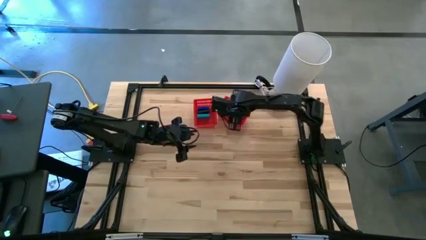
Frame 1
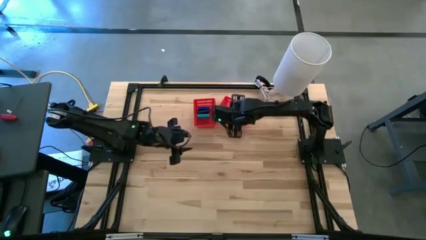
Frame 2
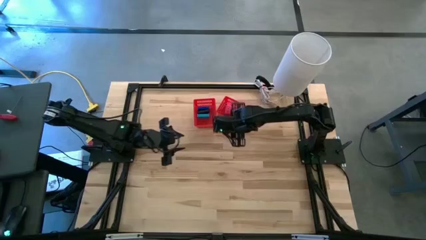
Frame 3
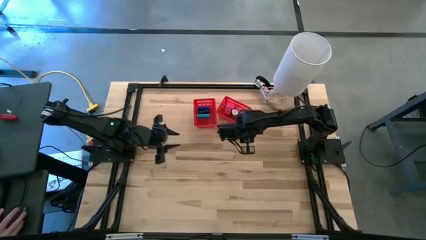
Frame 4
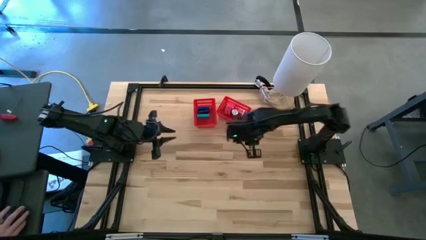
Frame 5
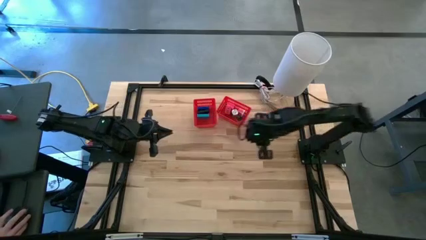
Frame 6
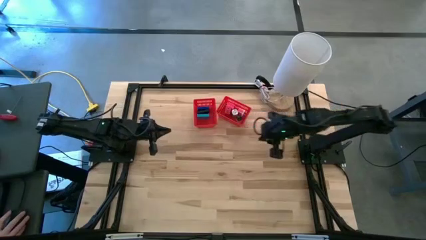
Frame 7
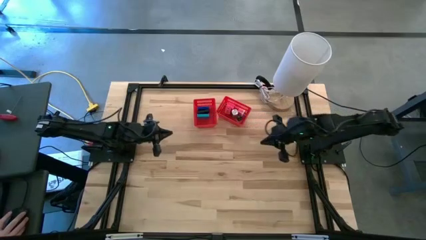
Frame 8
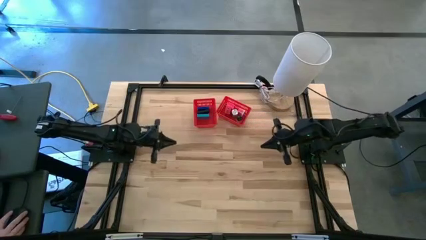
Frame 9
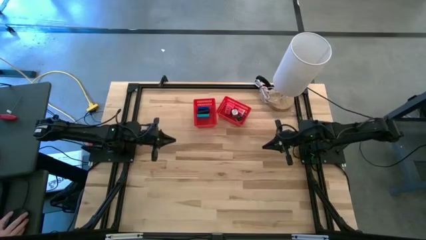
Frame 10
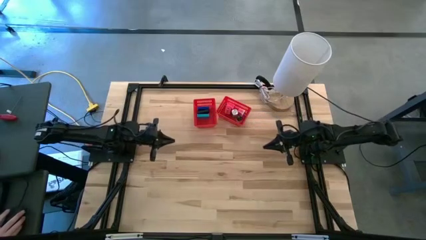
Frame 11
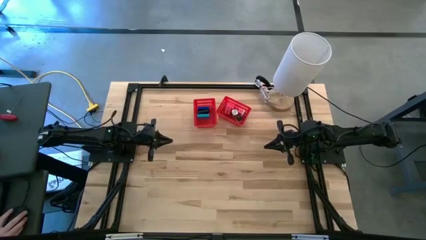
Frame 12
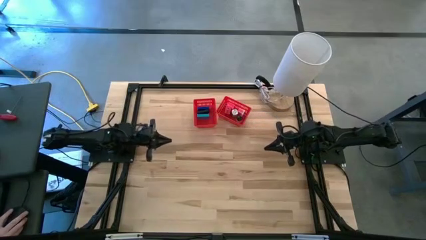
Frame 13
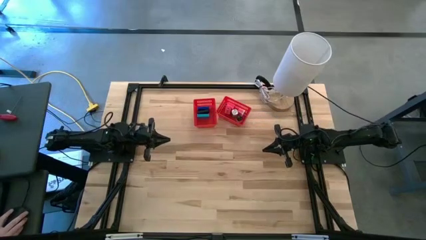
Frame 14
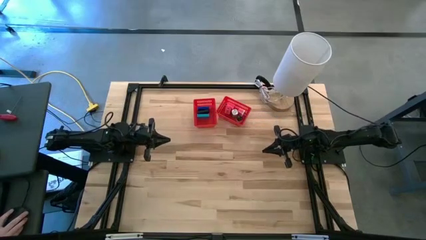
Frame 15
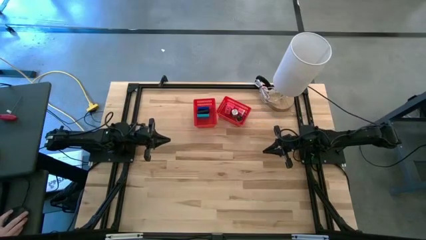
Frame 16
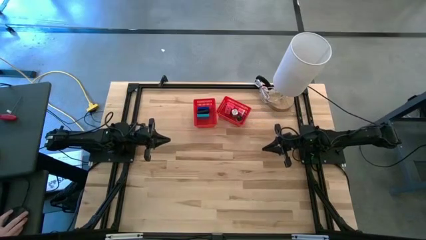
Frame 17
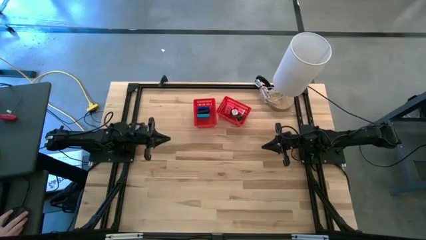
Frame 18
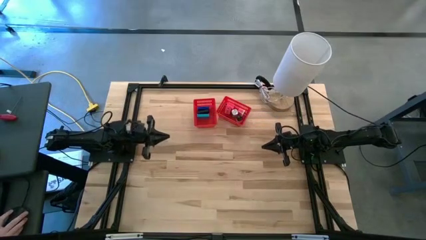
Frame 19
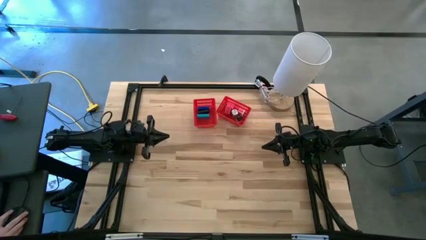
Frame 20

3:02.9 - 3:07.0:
Task: Pick & Place Office items
Return to Home Position

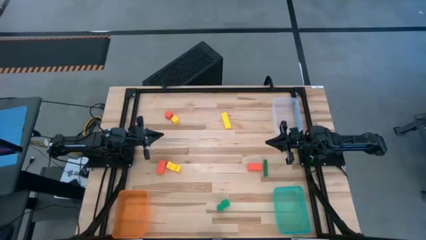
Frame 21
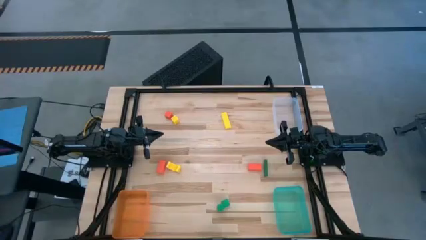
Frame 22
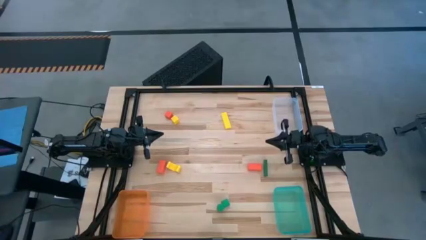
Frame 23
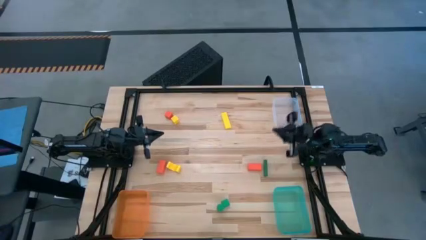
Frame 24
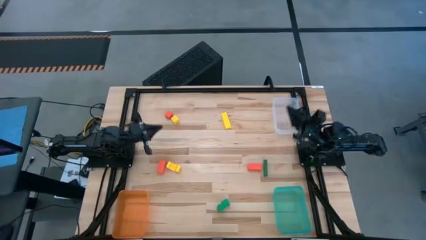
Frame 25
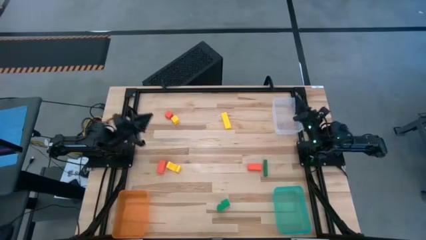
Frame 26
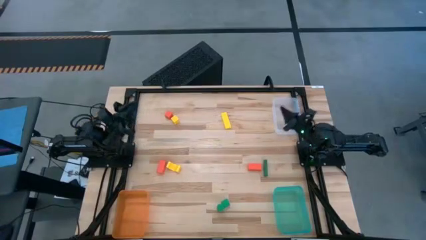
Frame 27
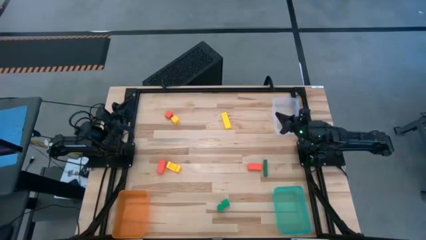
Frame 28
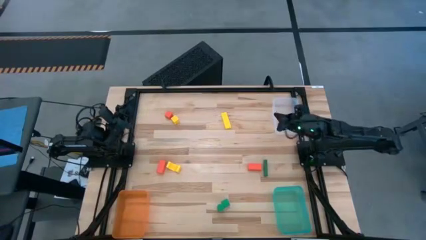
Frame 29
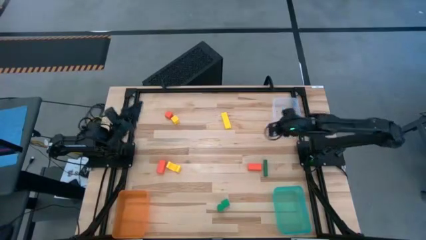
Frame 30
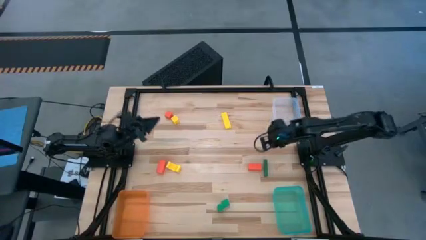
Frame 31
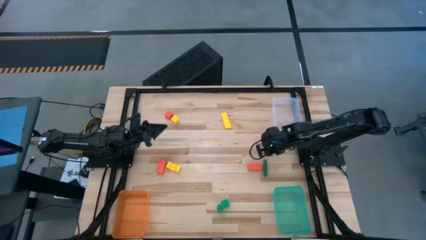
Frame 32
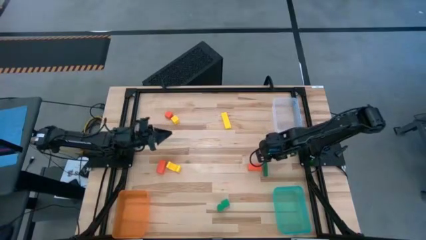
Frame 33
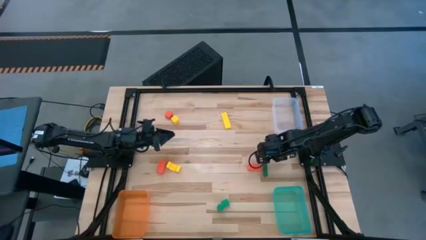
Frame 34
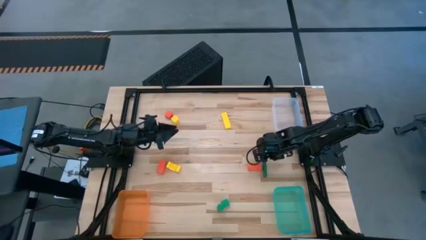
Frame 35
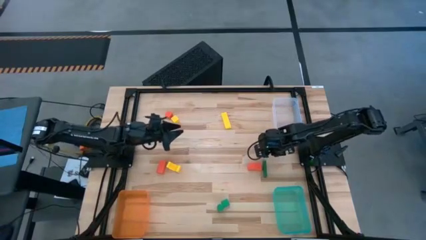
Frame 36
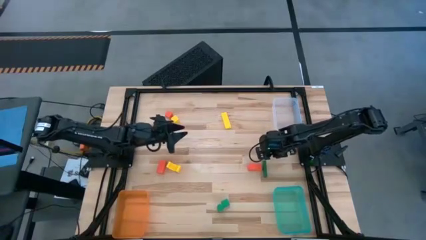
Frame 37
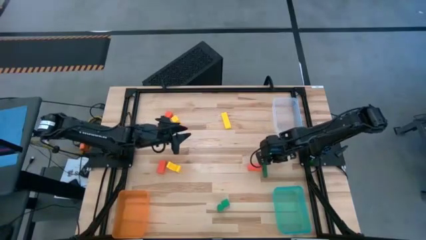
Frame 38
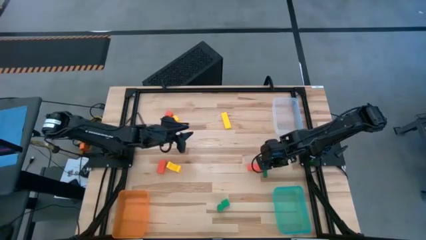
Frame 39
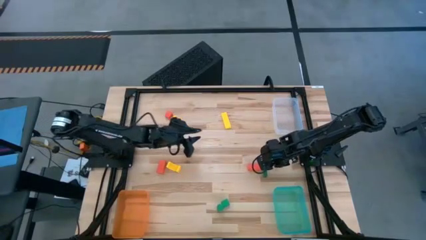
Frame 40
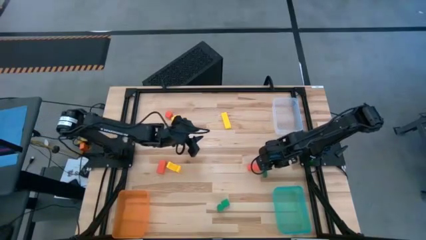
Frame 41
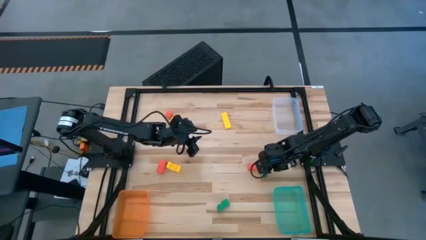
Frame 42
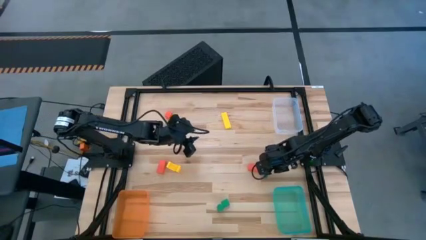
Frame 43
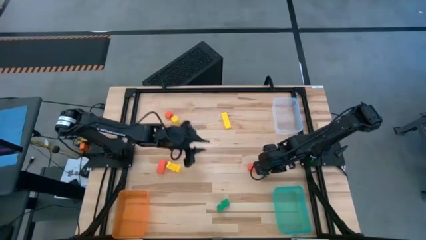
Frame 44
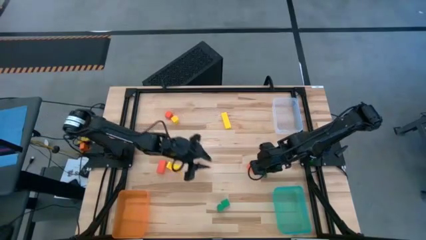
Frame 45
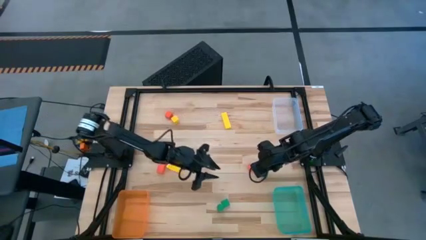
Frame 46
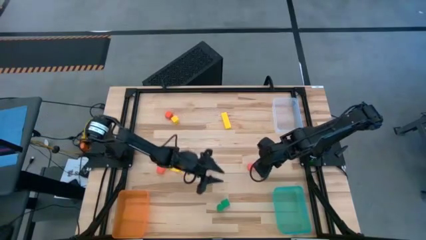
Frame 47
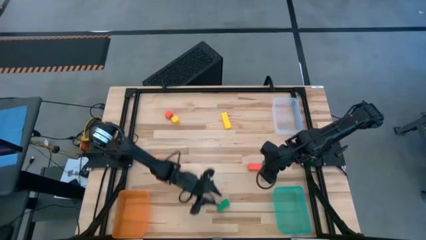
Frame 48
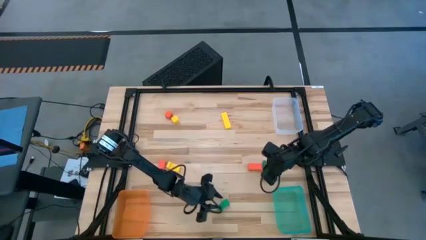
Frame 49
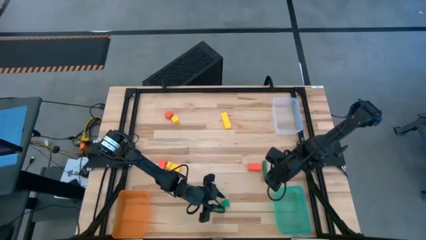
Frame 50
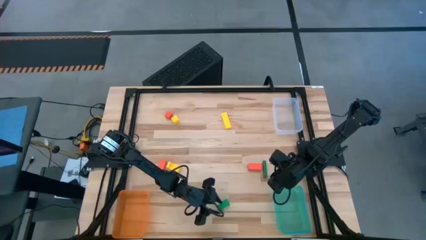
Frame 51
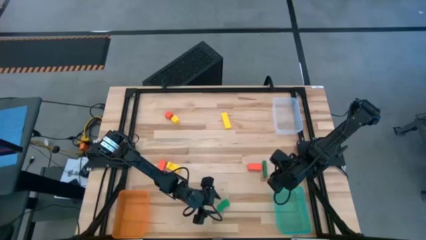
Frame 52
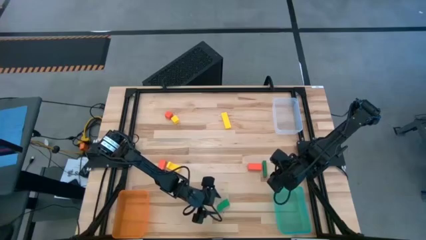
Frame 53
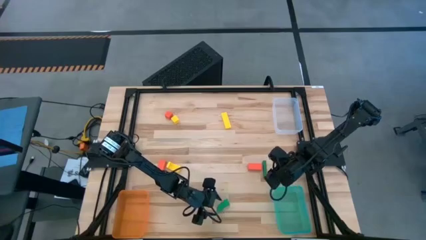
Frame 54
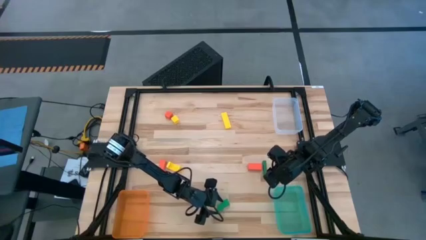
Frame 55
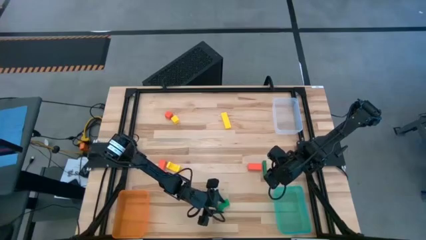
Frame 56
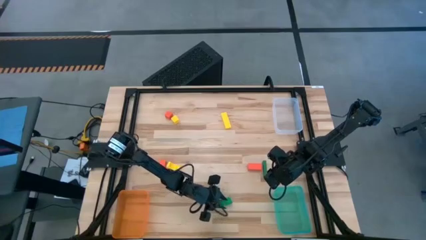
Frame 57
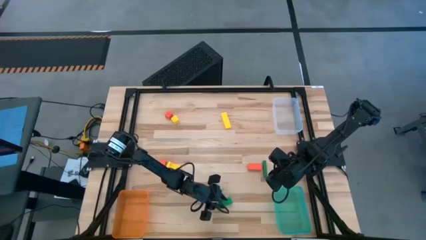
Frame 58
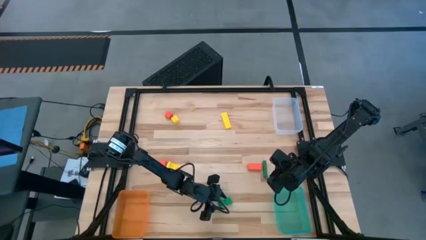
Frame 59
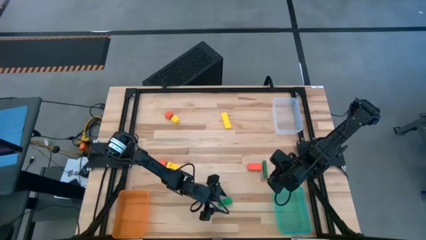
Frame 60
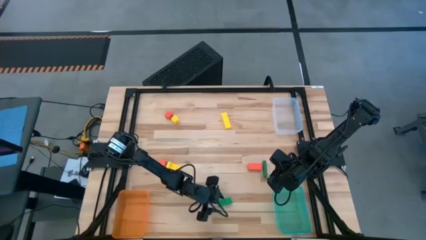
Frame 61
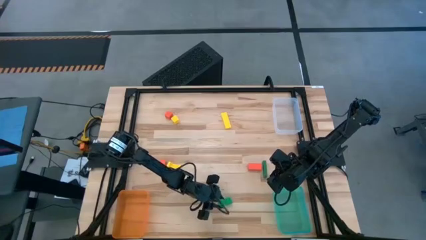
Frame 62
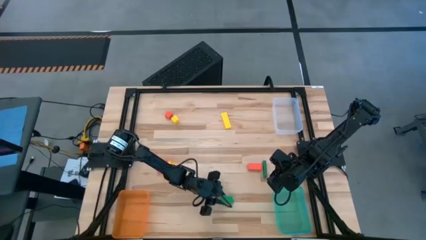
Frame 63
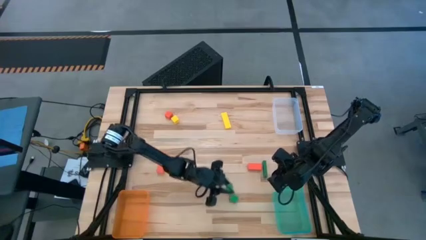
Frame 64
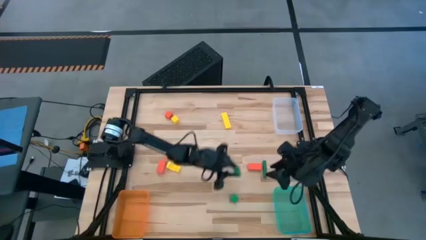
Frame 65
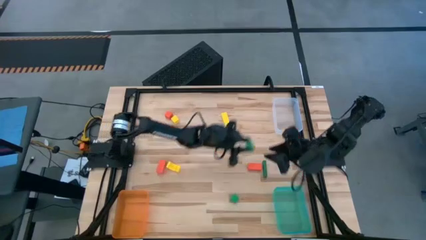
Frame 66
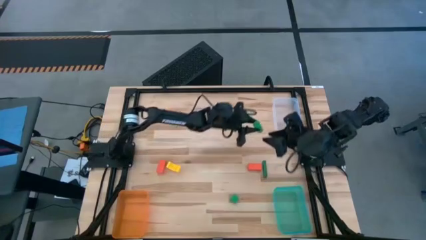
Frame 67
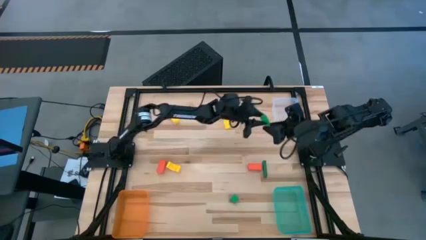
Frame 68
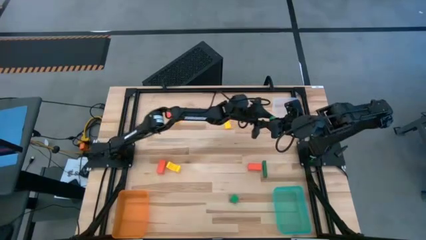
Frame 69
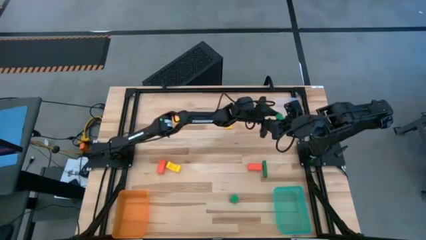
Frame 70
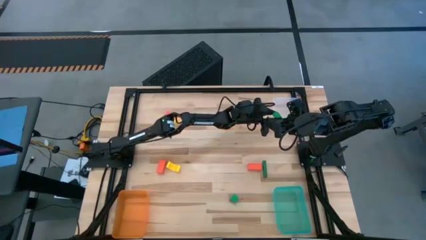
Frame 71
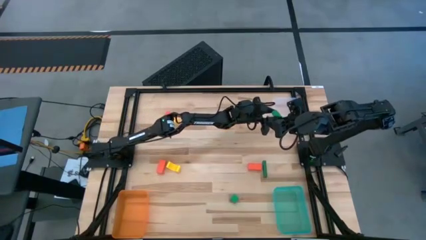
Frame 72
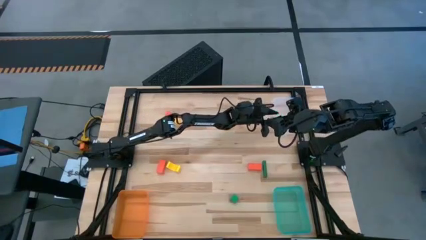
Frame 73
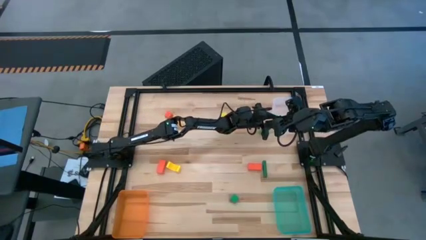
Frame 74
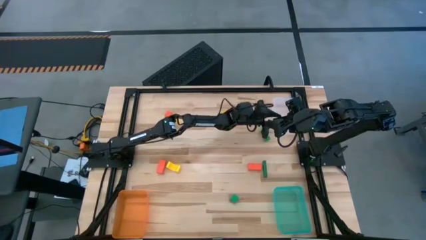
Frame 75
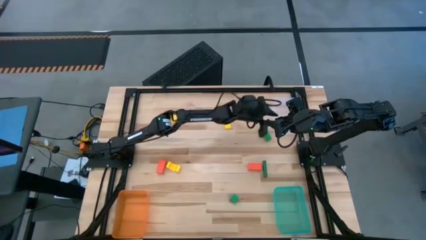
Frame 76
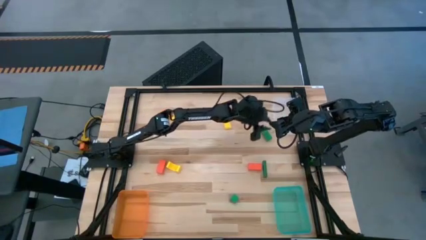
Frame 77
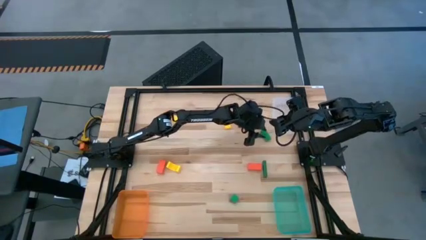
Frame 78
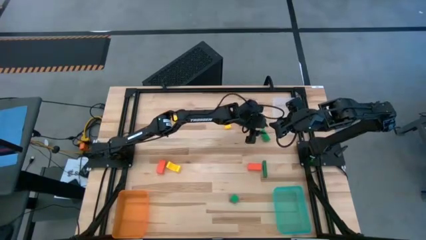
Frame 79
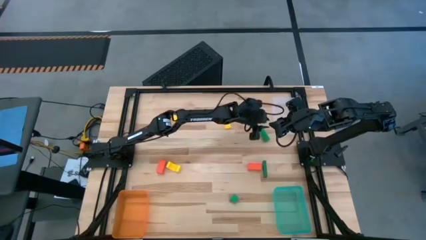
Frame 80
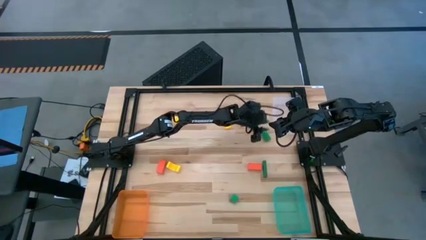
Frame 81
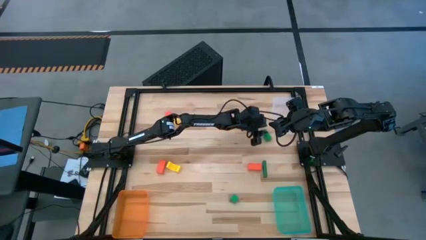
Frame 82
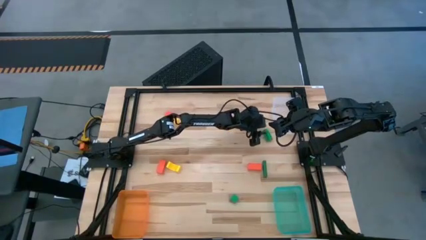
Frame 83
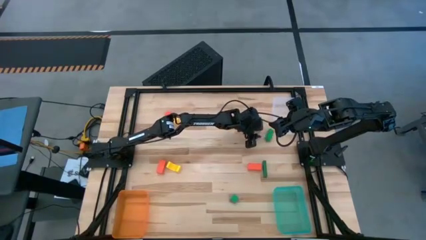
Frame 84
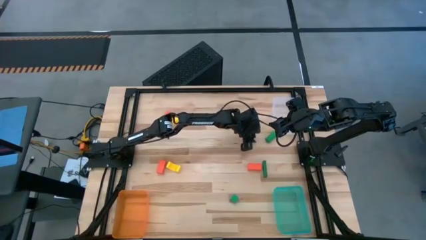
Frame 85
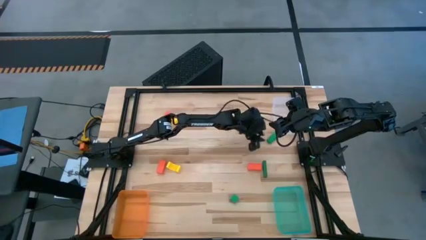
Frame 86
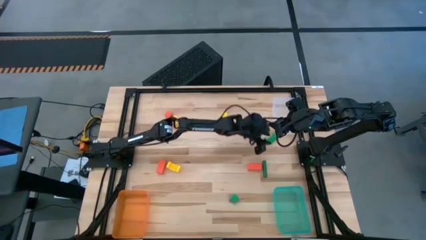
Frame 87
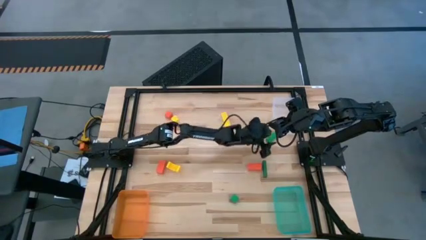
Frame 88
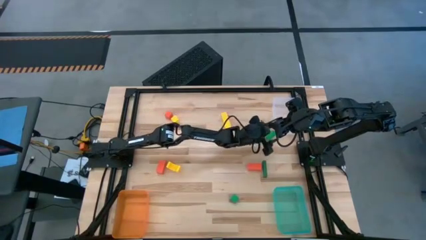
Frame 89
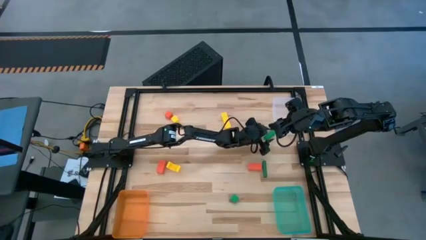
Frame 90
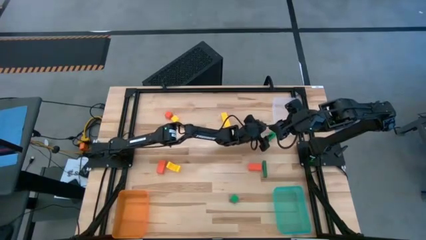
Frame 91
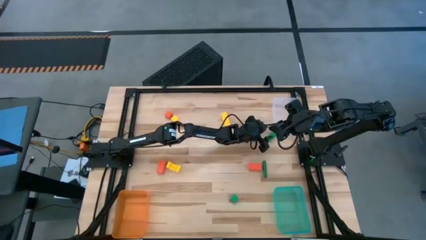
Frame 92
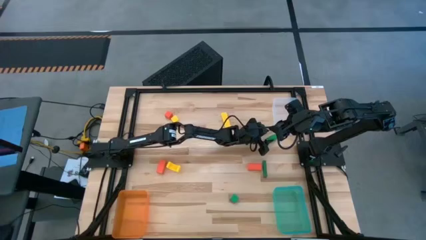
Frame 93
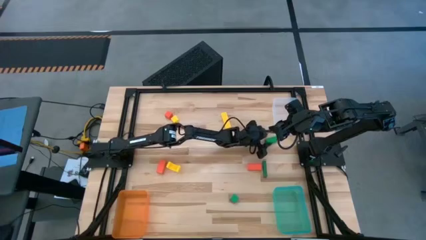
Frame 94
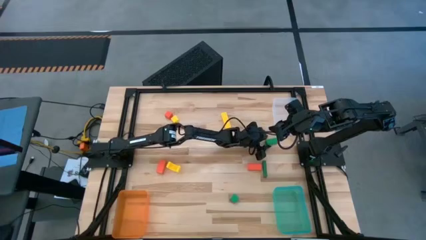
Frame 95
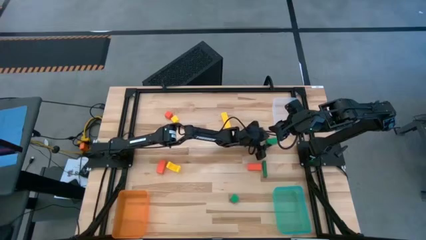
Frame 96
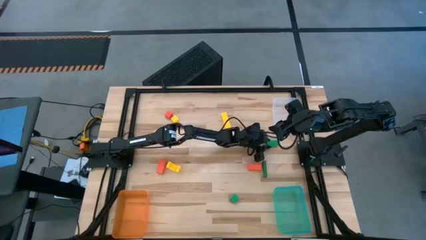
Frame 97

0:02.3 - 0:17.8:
Task: Sort & place blocks by color
Put the bottom left green block into the orange bin
